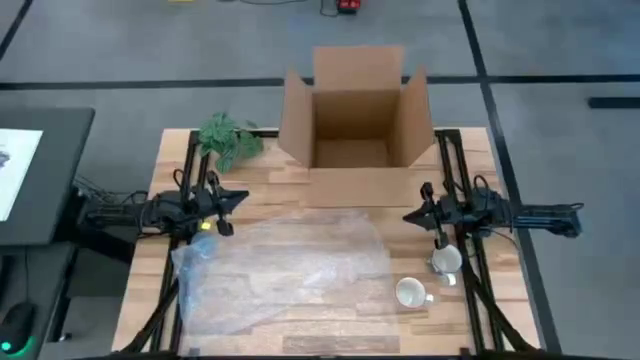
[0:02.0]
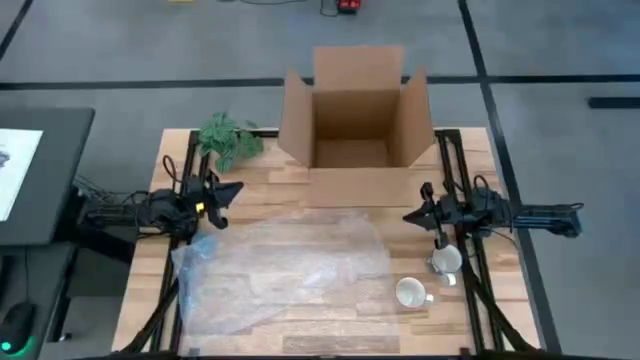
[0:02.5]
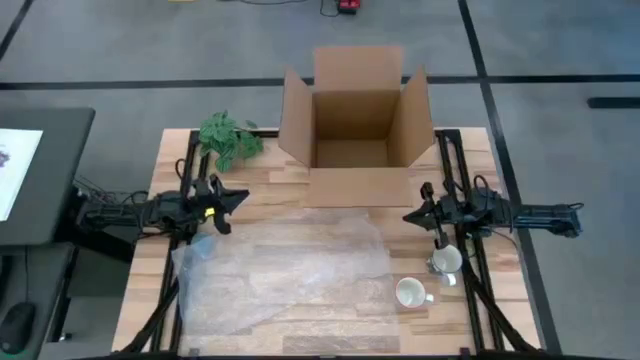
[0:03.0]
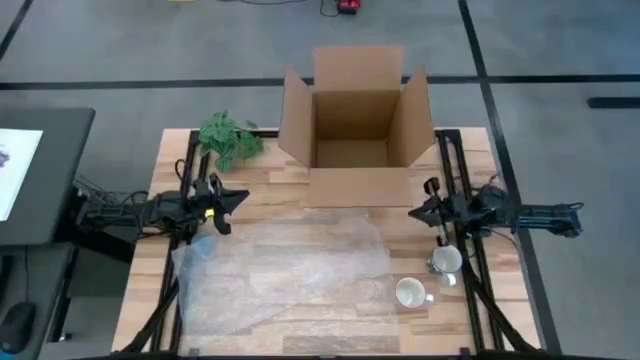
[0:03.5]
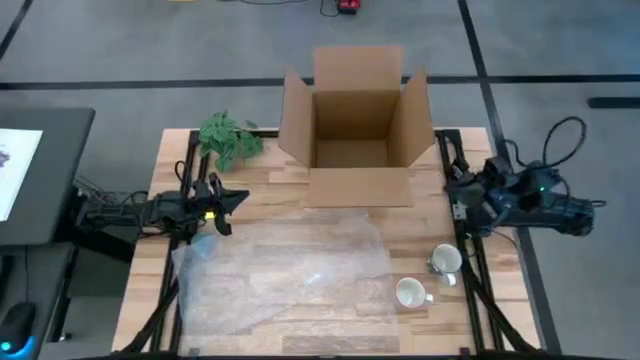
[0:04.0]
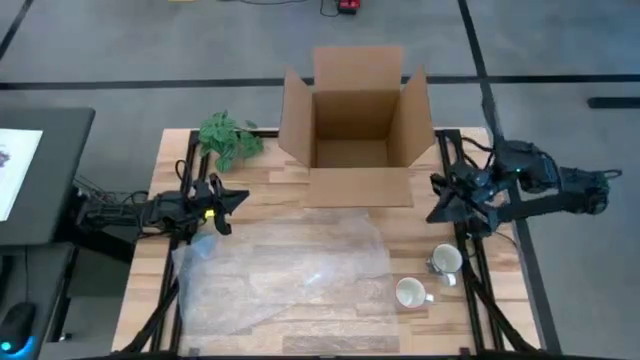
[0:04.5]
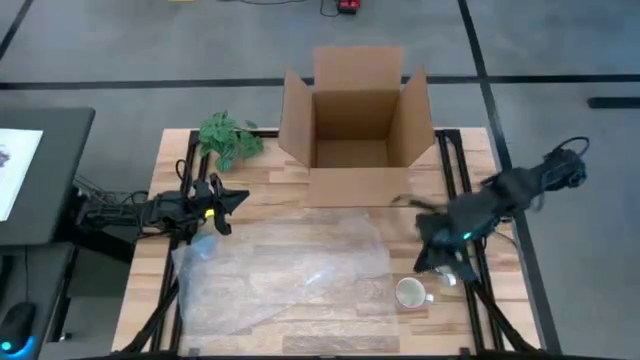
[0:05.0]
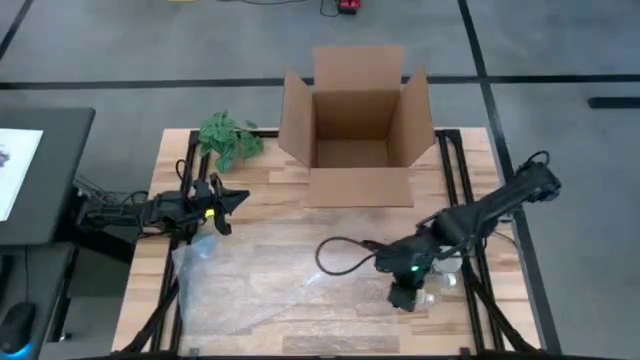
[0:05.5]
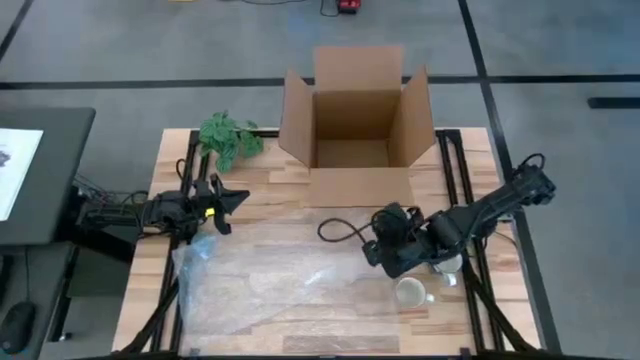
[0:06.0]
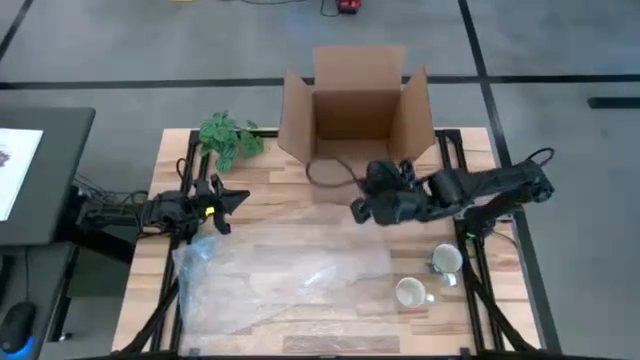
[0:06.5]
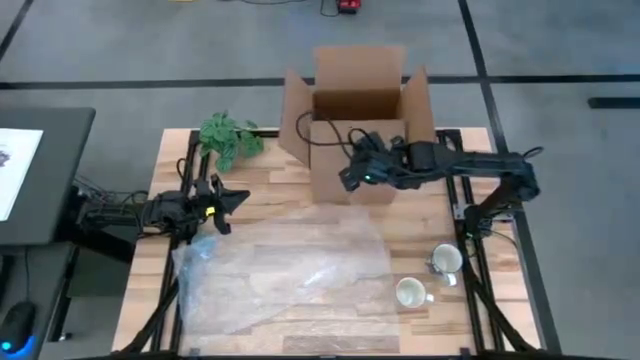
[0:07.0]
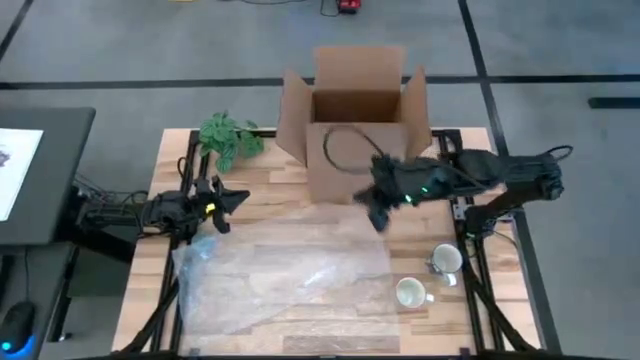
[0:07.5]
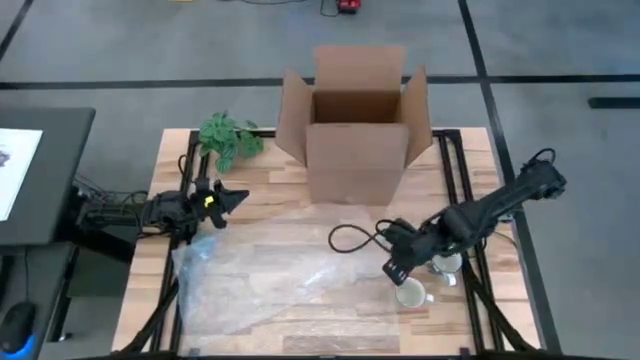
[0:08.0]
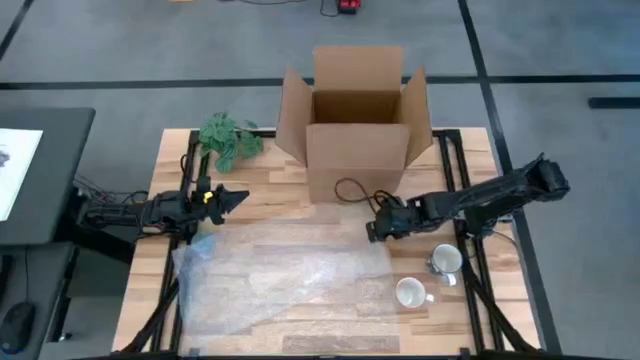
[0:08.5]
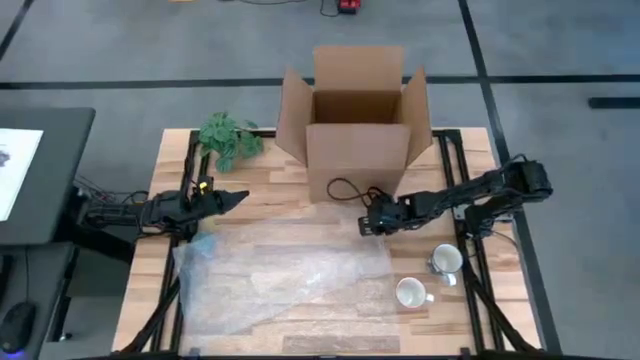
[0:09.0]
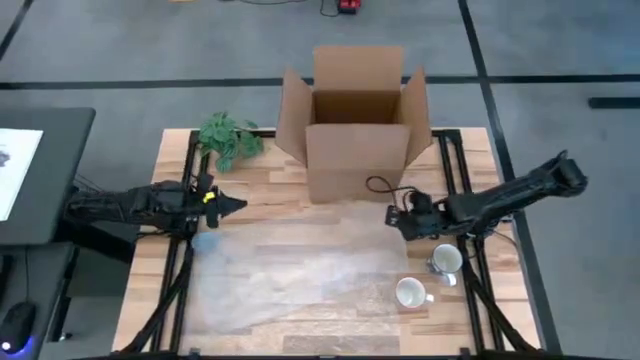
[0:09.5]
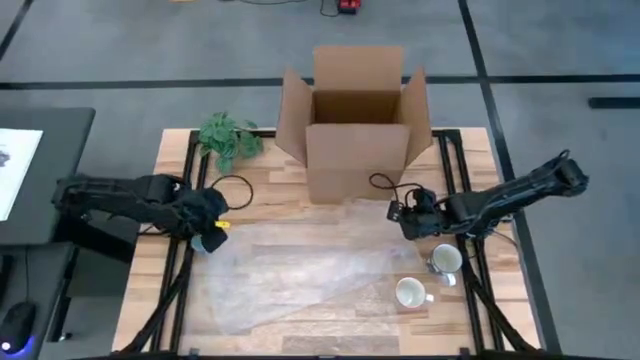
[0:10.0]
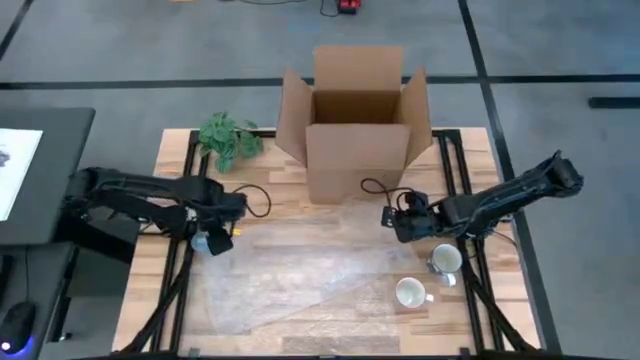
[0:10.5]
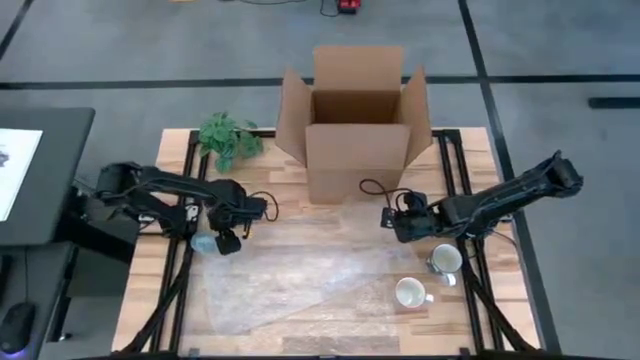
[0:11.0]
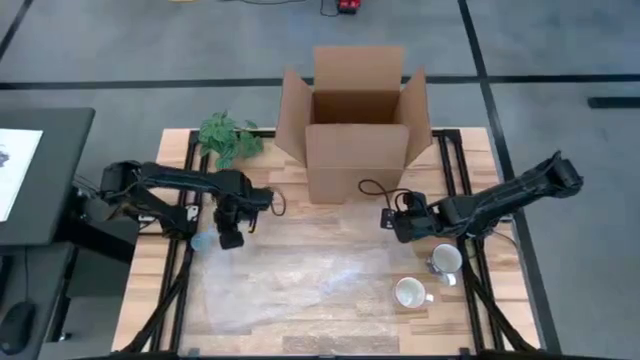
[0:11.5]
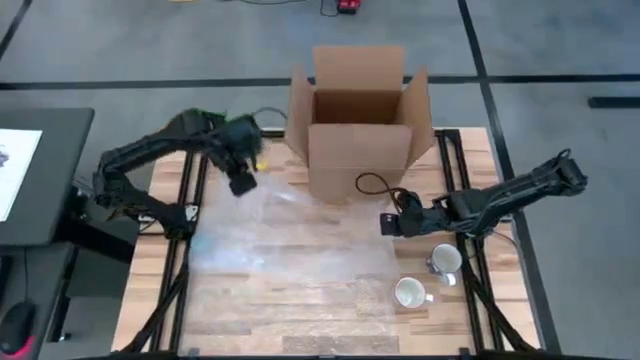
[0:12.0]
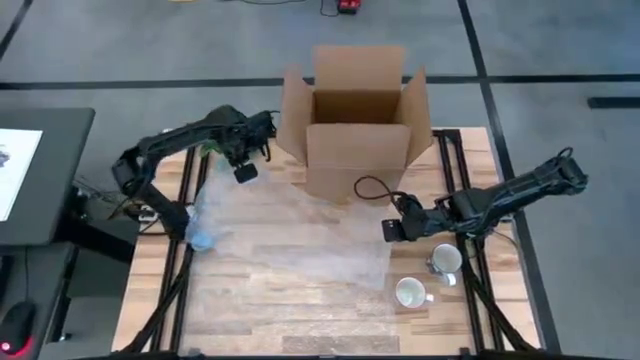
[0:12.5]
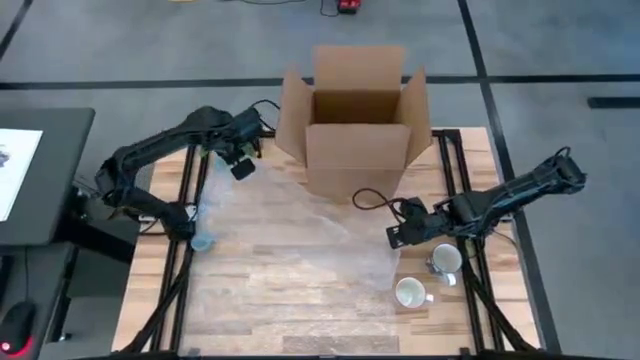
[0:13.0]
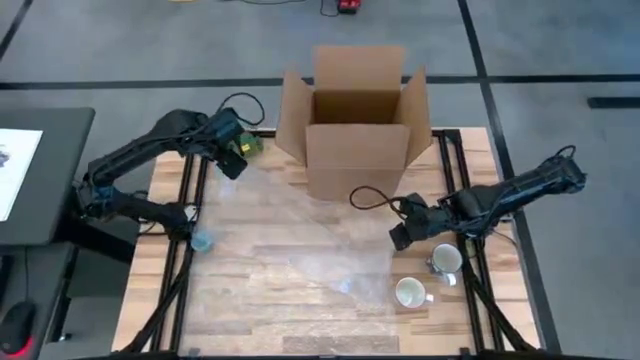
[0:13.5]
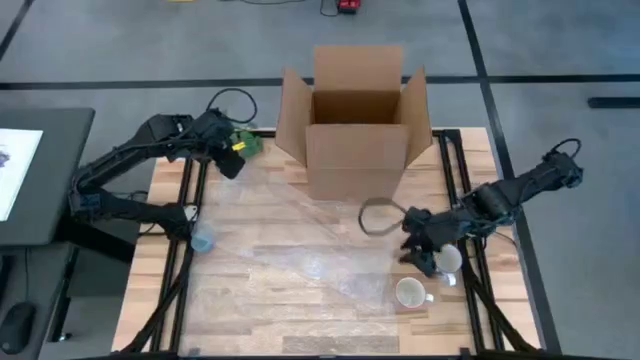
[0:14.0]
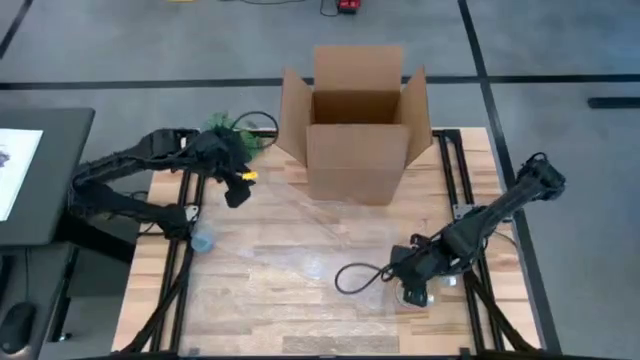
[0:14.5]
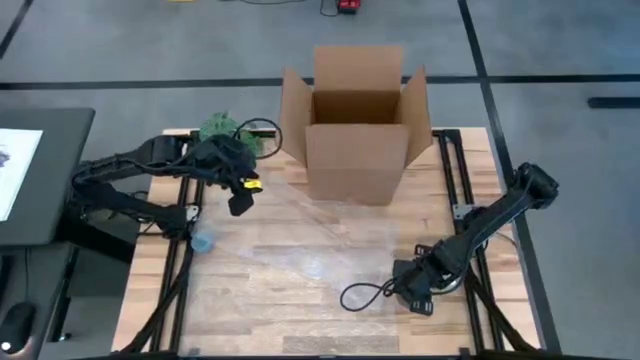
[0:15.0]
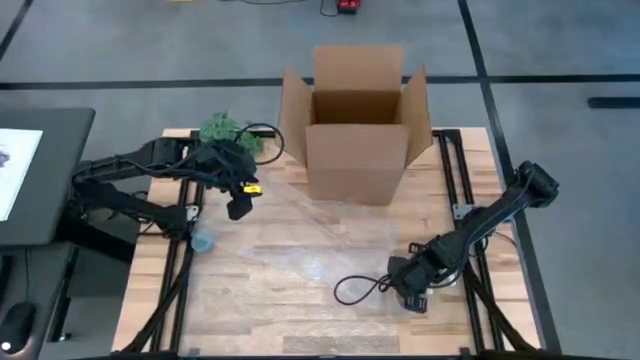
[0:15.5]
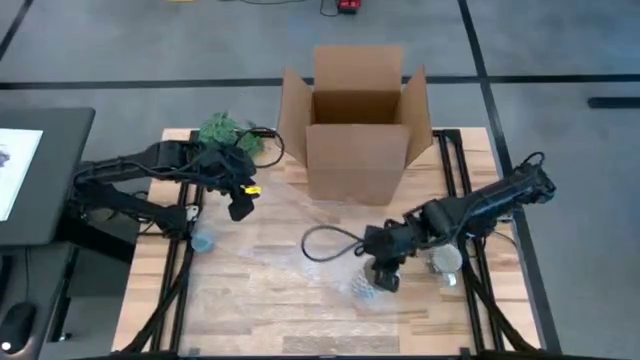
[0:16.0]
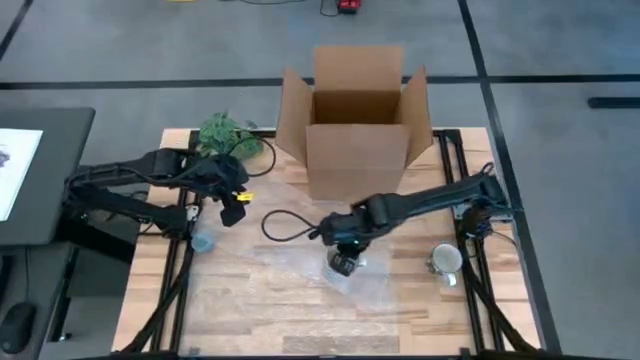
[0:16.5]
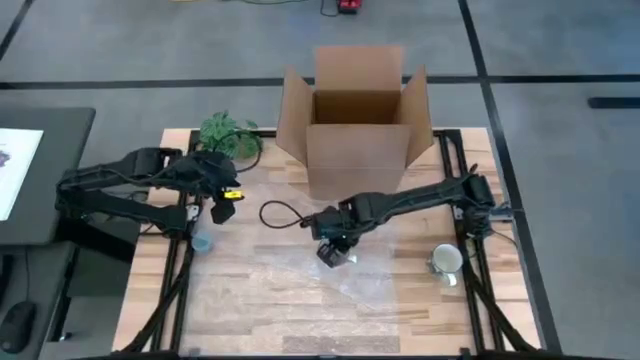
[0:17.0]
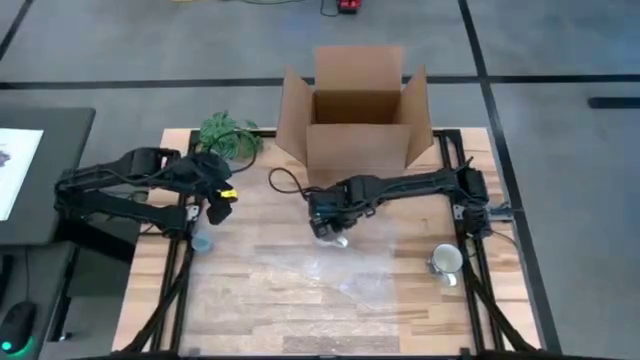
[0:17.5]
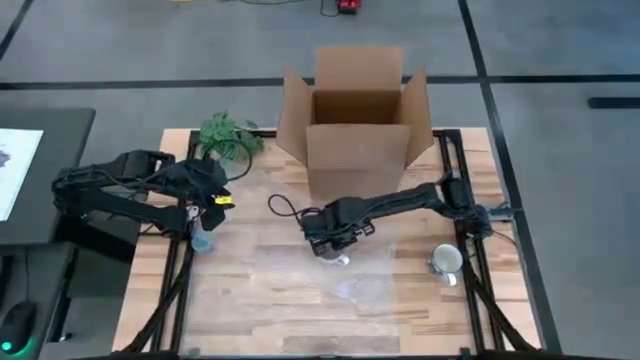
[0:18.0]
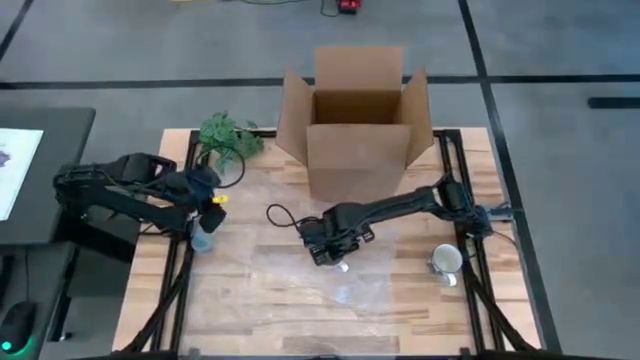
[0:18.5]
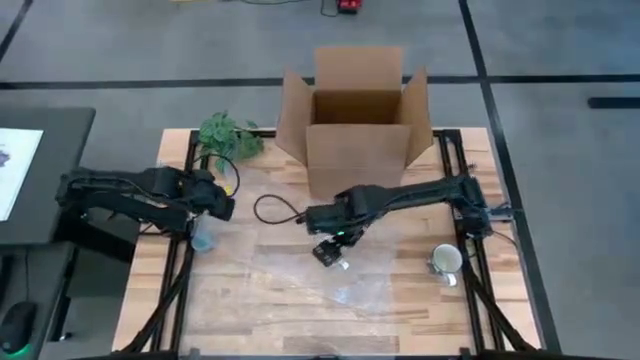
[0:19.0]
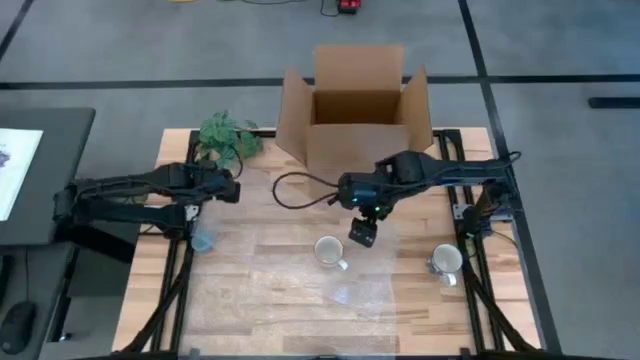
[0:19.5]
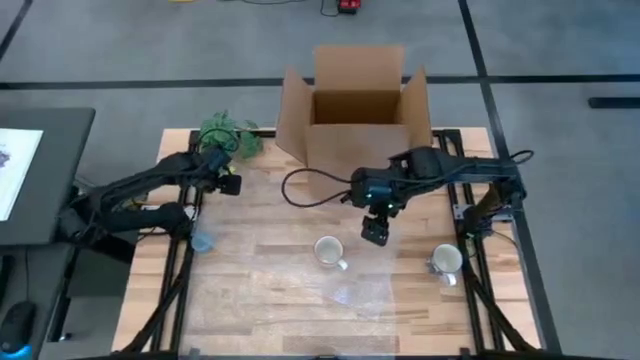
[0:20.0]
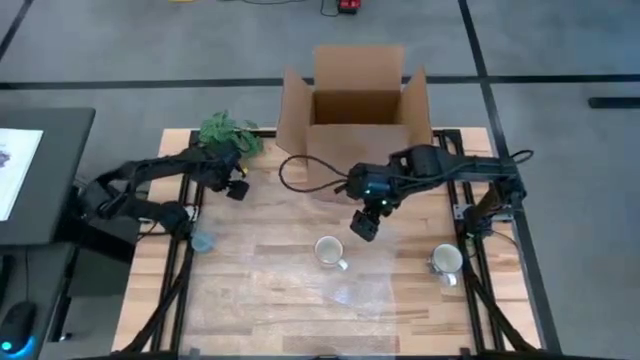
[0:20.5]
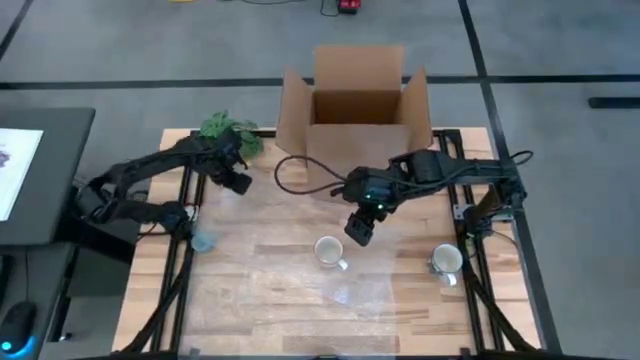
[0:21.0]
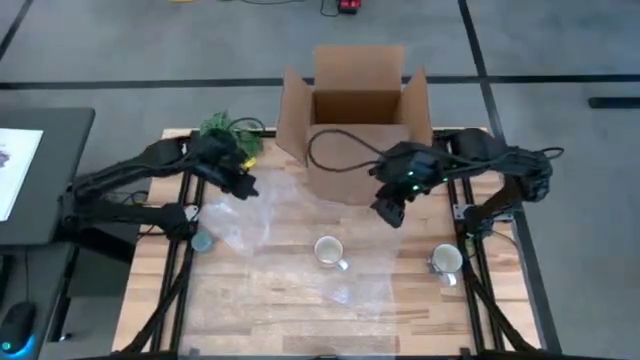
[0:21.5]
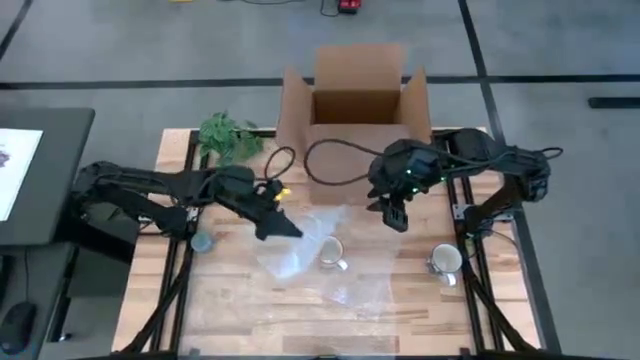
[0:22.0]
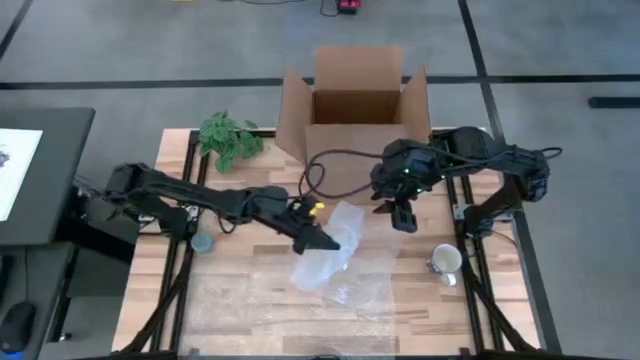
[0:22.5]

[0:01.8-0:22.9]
Task: wrap mug
Wrap the white mug with bubble wrap
